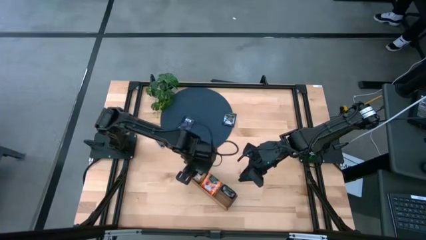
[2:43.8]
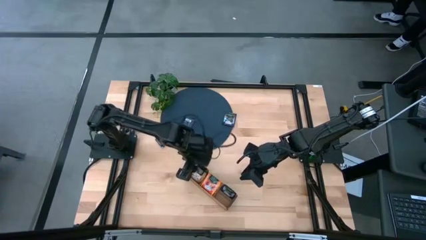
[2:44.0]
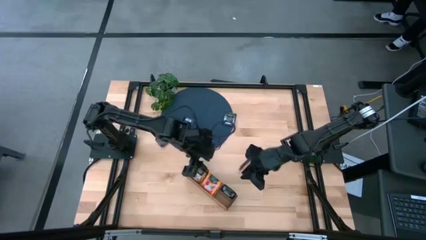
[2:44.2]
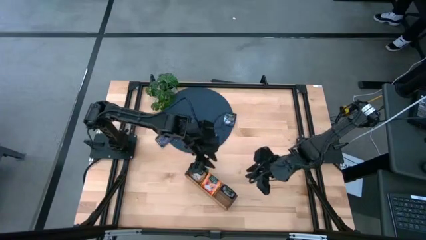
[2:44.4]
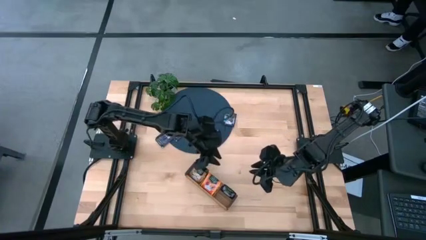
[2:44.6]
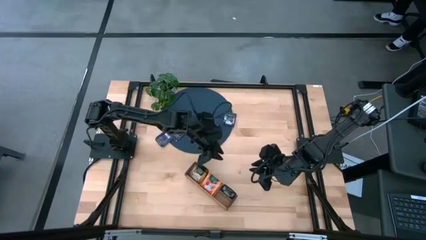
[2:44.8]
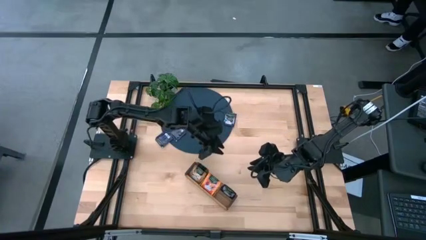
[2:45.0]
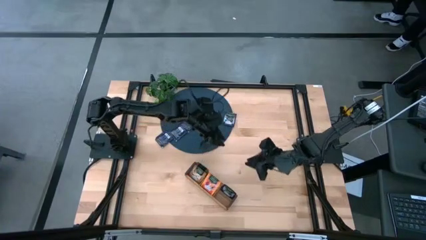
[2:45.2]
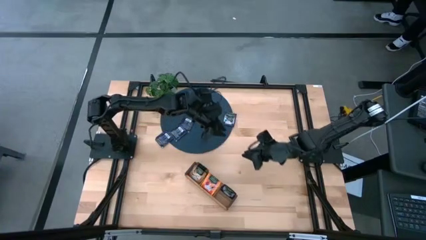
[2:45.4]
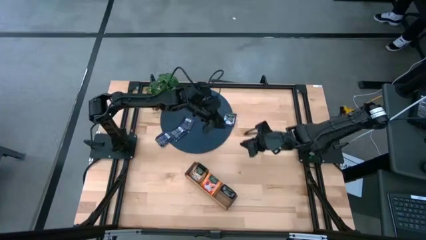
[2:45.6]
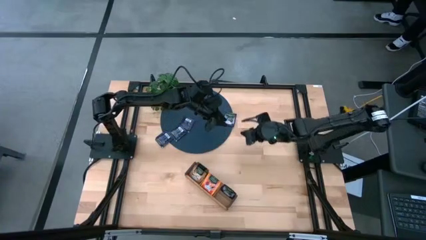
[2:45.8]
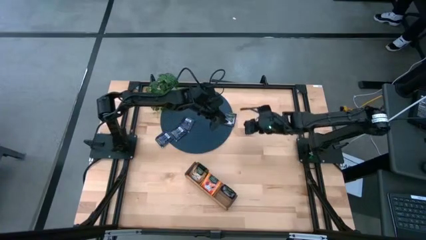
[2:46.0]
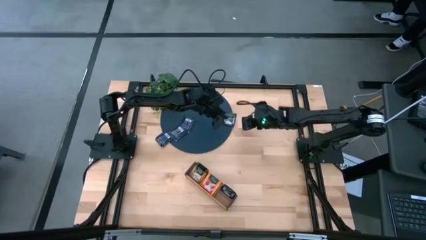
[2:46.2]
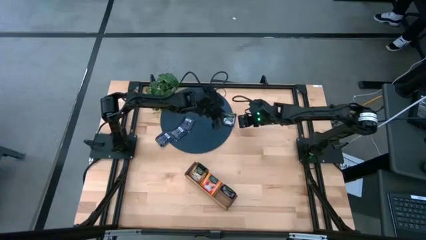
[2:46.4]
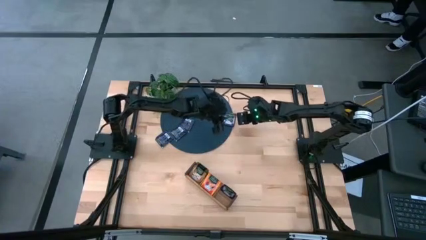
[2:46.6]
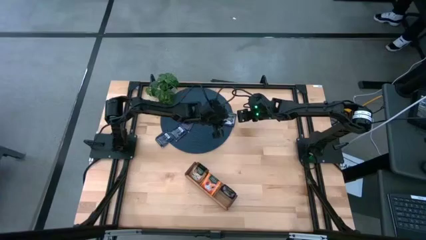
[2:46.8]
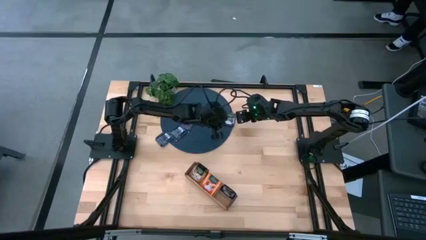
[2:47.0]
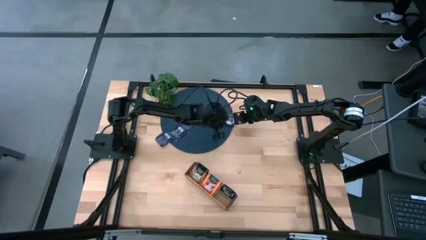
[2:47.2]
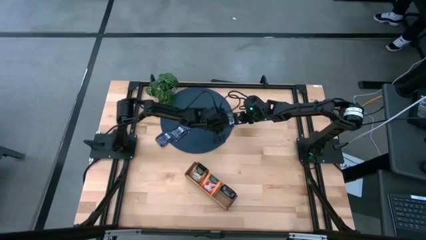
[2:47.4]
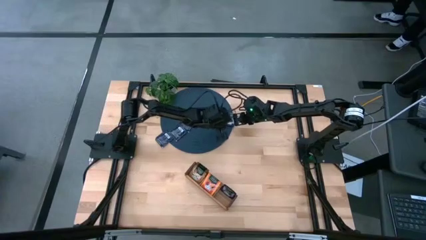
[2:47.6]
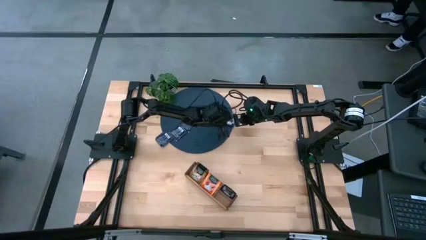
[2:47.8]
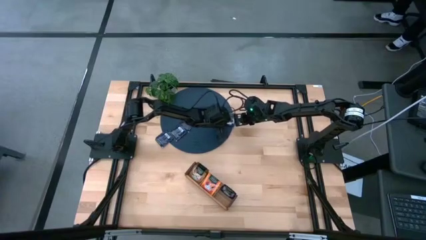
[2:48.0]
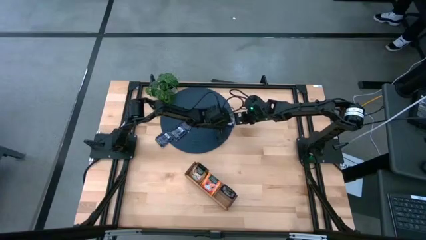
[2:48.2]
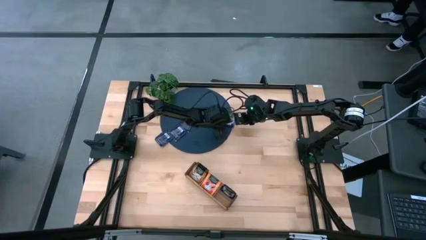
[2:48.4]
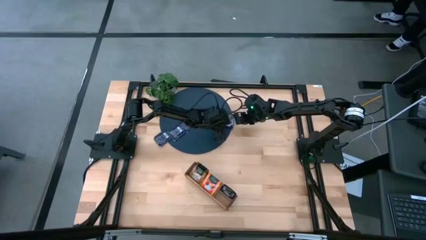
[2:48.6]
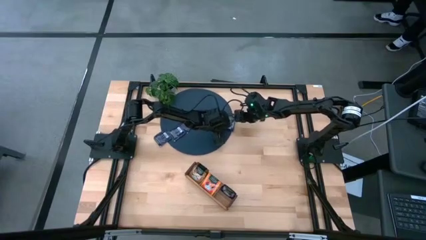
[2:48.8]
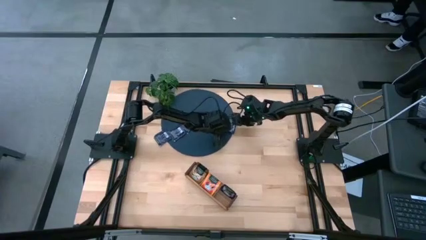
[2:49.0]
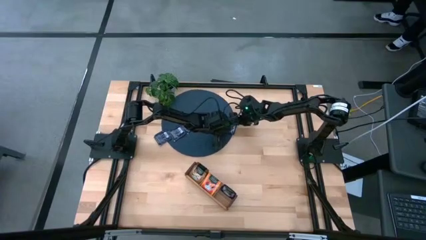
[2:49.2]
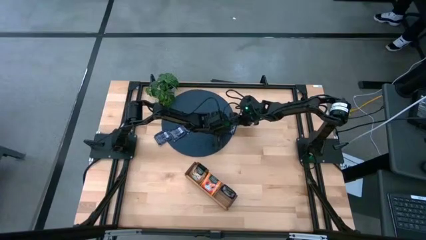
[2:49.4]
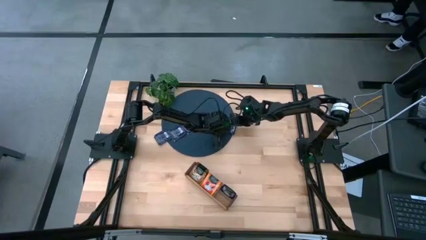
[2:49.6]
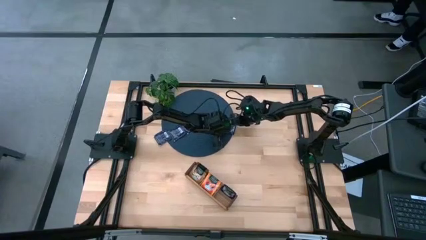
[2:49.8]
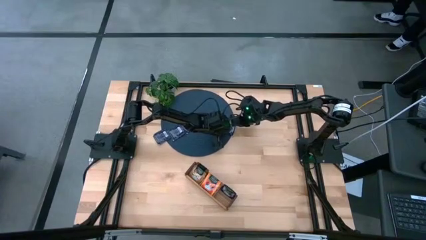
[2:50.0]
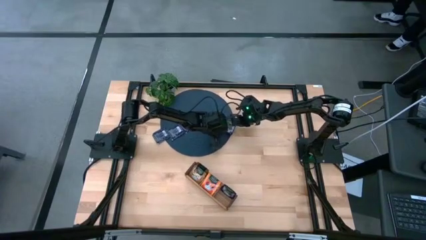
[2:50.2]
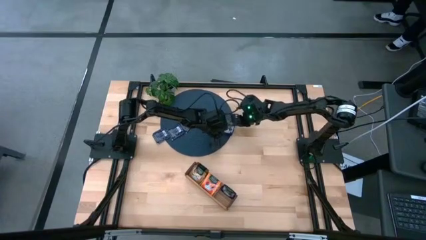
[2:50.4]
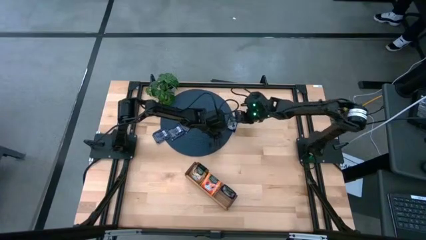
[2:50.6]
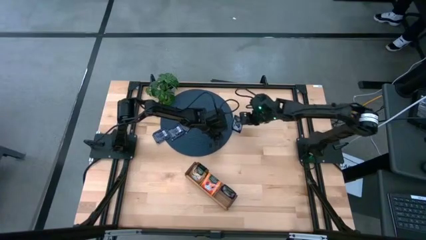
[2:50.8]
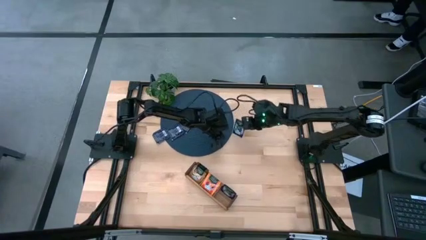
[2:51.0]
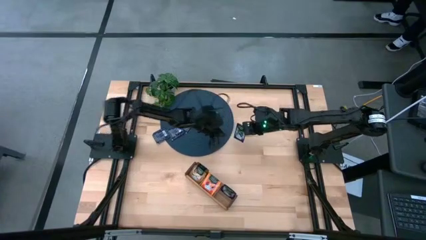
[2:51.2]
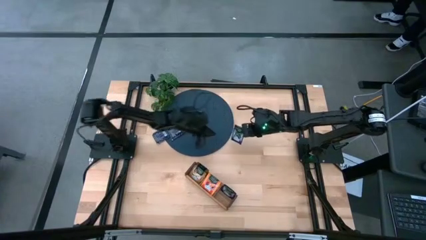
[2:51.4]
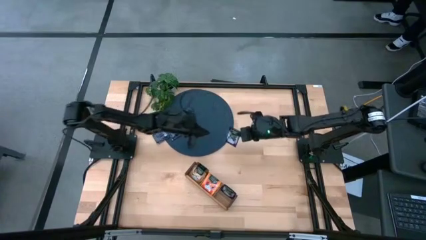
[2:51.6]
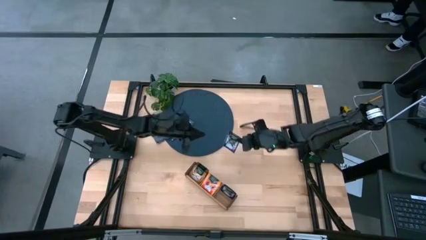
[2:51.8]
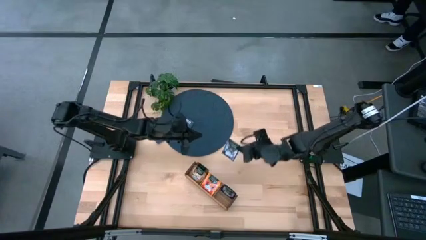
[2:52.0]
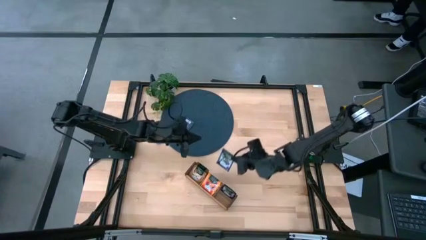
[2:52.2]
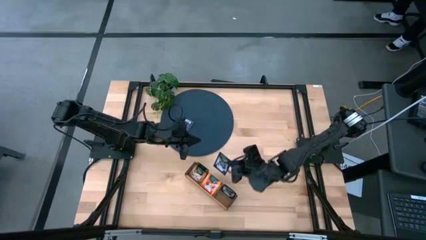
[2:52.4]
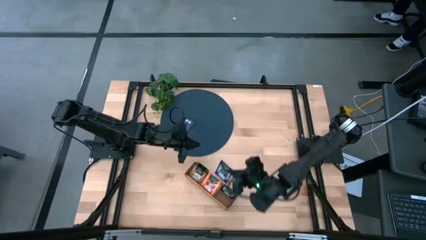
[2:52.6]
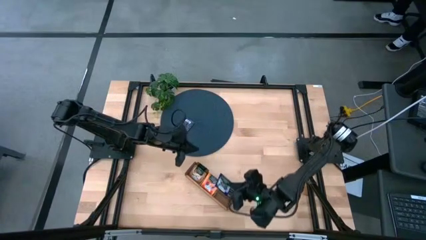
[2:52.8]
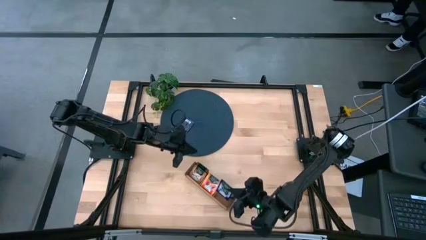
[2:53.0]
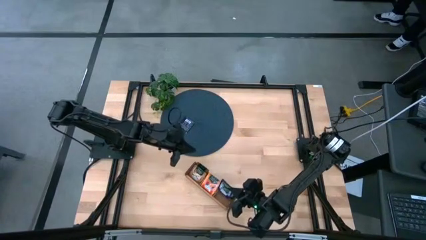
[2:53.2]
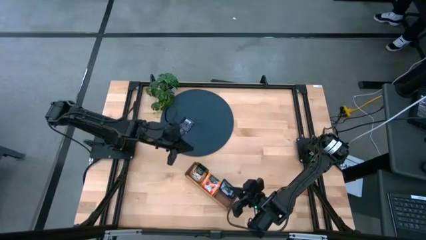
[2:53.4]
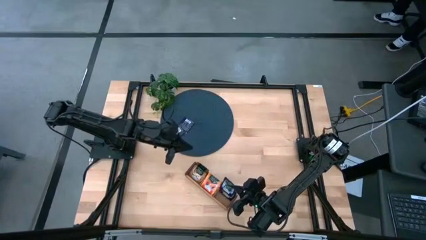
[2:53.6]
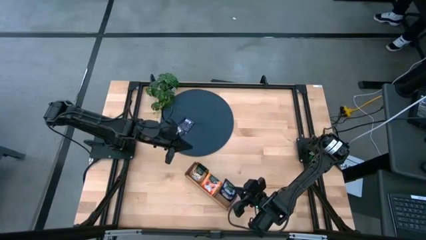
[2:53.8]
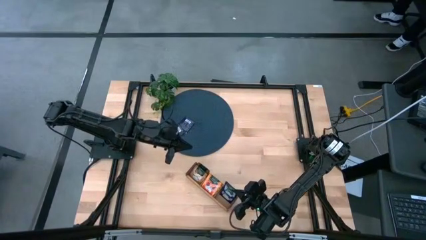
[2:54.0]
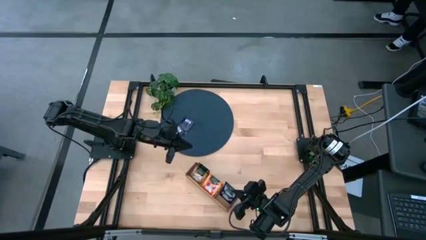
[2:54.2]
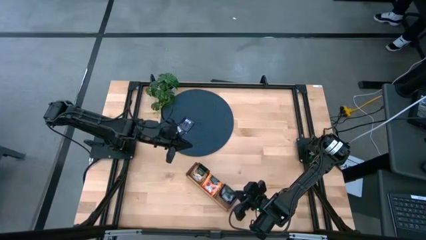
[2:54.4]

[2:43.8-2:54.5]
Task: Pick & Place Tea
Put the violet tea bag into the right section of the wooden organizer

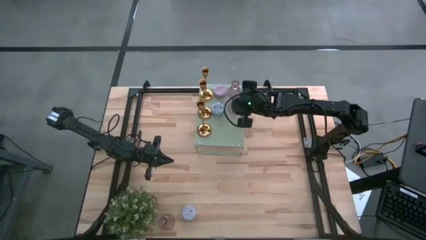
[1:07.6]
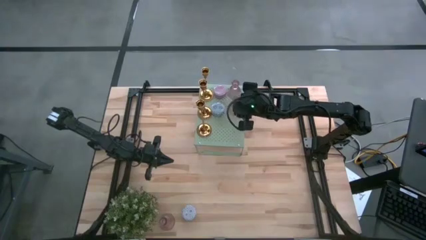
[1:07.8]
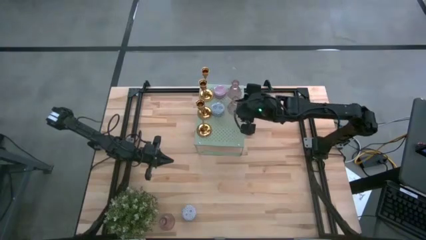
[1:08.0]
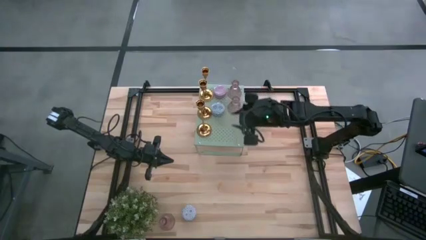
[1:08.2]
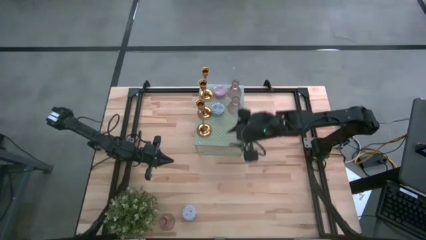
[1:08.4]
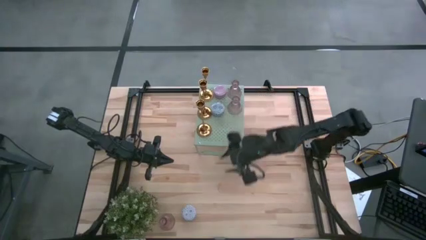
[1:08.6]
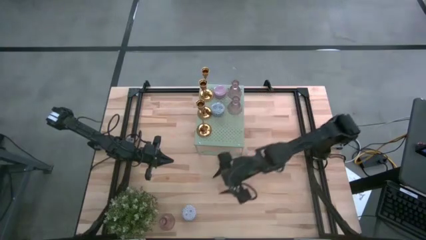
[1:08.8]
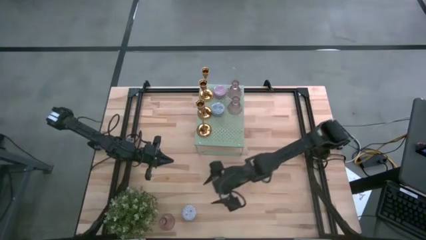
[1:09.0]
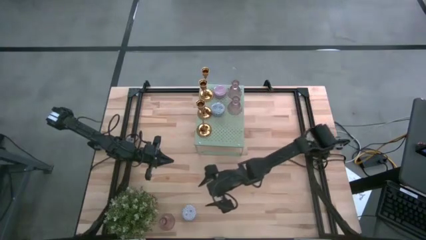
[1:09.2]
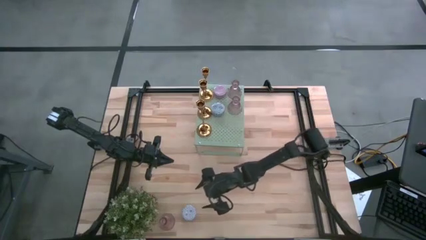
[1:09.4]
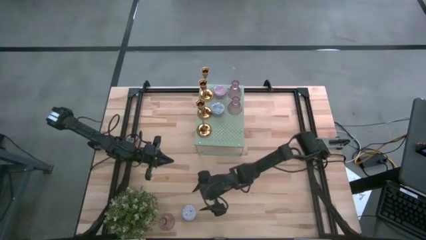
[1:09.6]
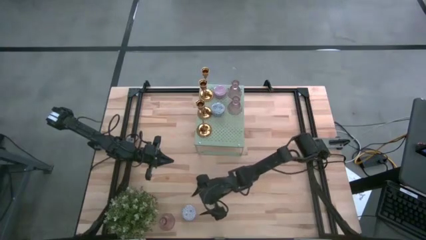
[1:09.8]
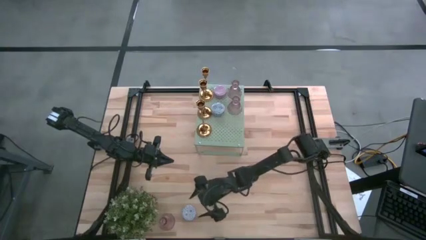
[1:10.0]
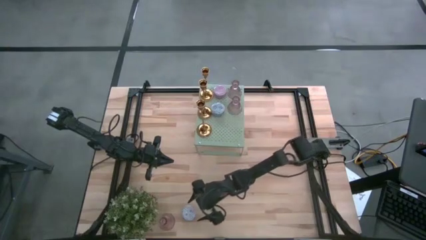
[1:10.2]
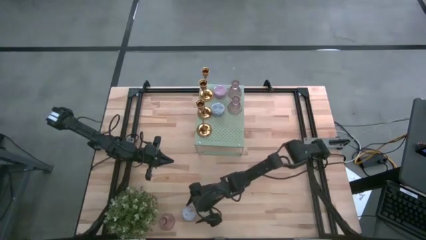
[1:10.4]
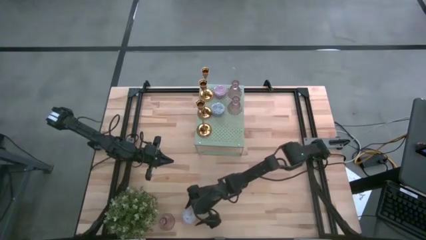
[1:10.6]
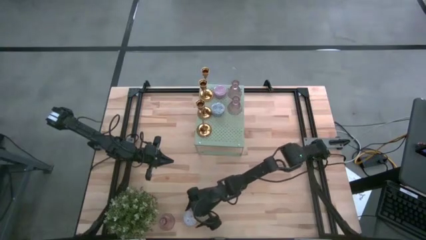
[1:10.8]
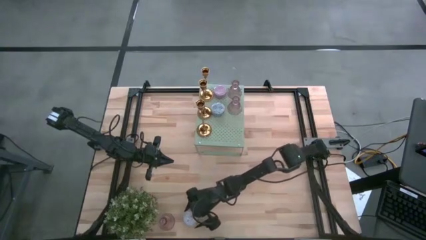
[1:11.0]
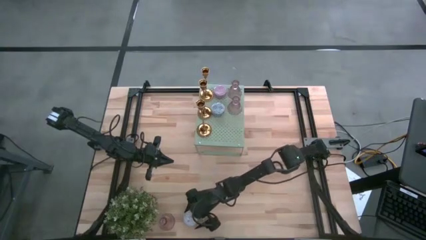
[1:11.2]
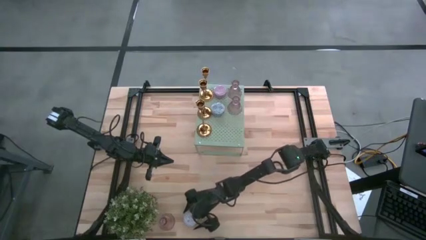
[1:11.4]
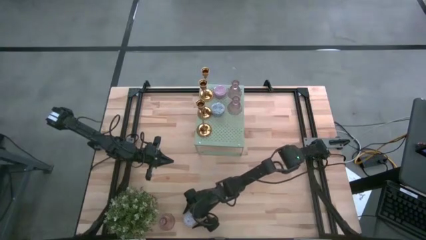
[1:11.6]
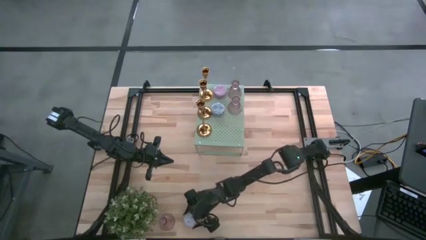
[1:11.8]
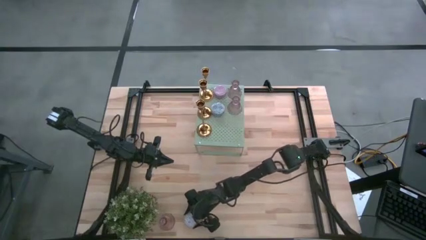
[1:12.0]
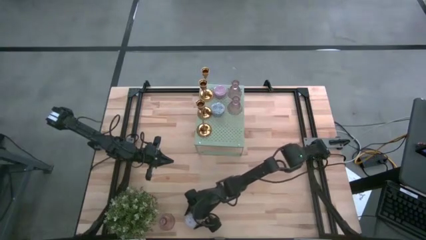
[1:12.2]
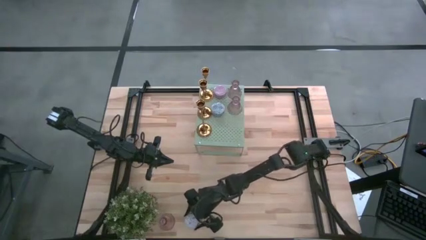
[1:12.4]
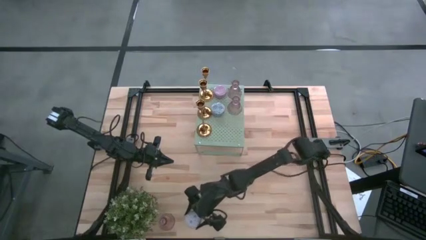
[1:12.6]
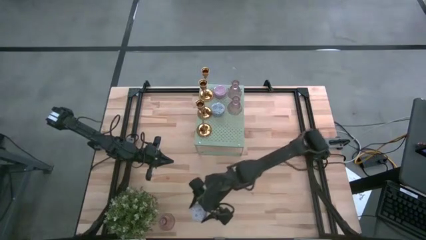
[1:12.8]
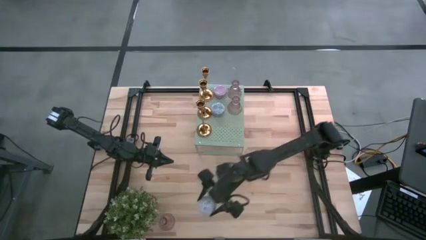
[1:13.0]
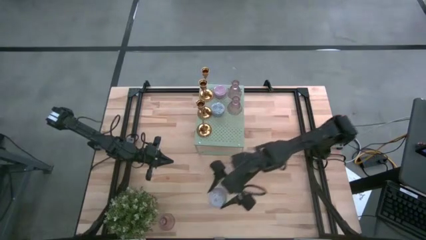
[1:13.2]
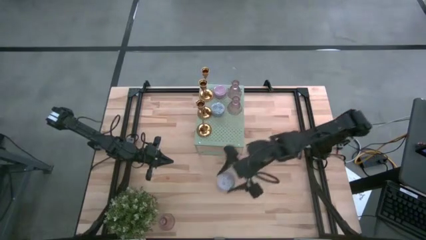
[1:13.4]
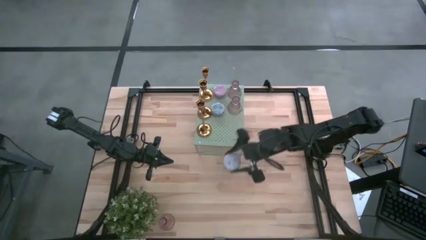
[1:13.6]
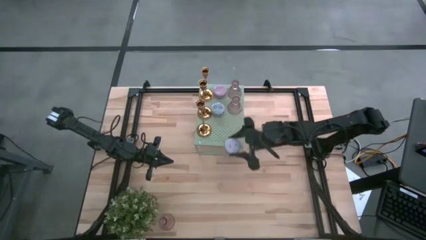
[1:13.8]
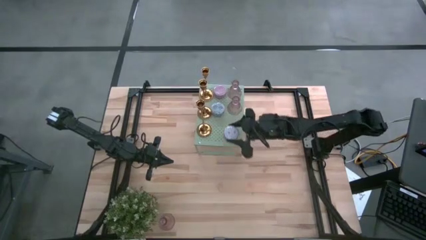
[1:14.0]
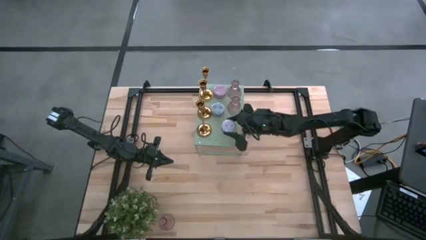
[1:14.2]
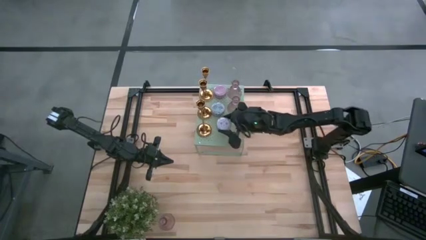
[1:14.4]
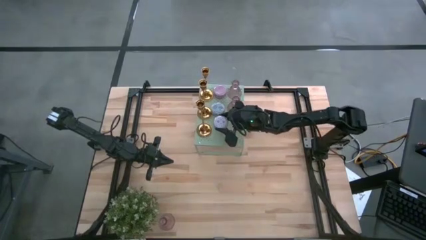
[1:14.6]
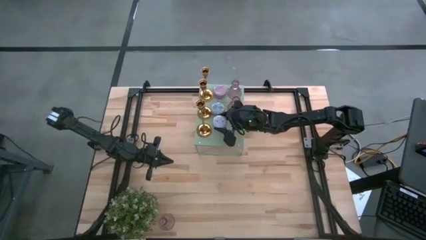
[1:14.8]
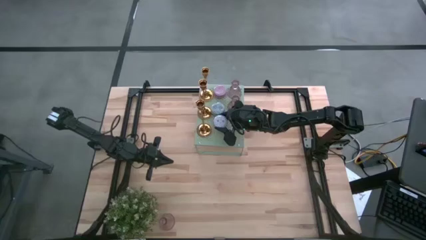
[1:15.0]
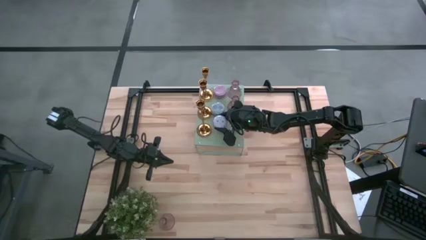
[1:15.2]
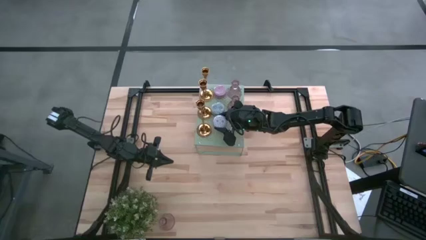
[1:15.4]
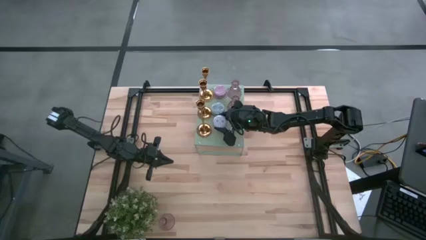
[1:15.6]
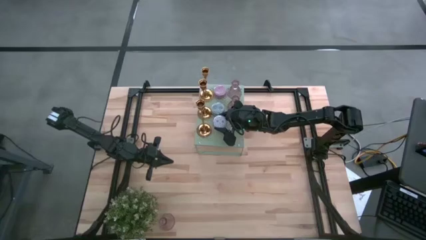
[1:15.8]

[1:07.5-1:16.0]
Task: Pick & Place candle stick holders
Put the patterned light maroon scented candle on the shelf
